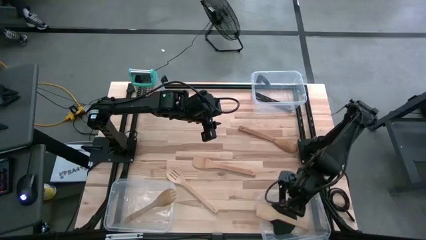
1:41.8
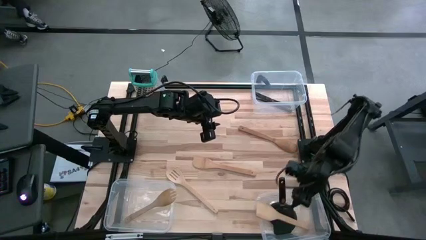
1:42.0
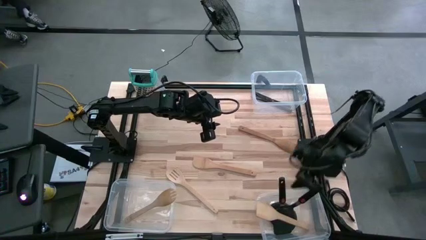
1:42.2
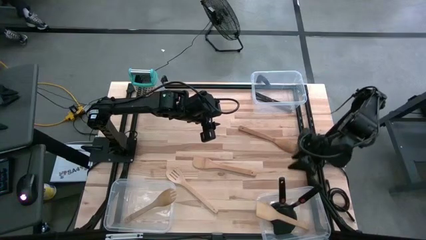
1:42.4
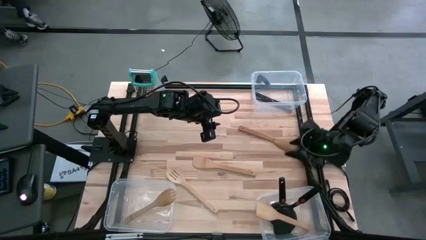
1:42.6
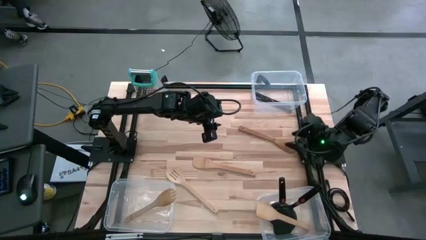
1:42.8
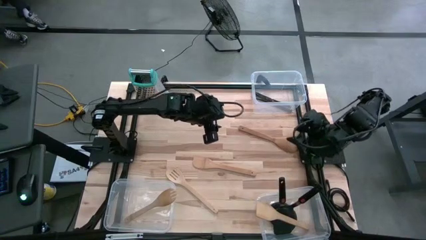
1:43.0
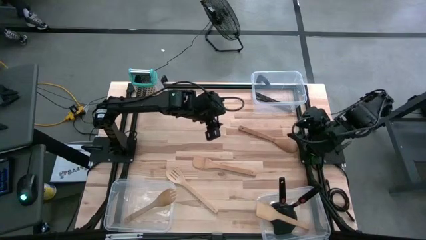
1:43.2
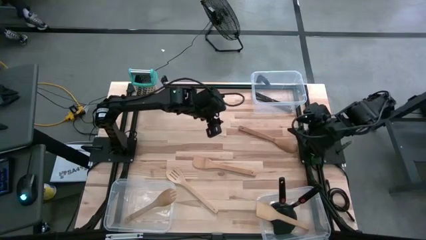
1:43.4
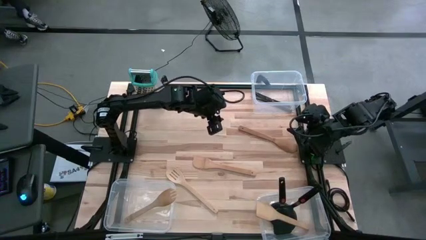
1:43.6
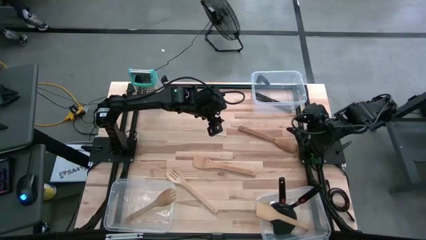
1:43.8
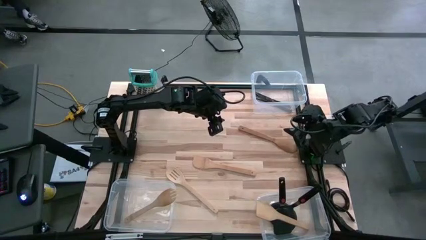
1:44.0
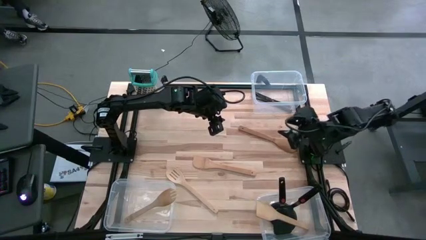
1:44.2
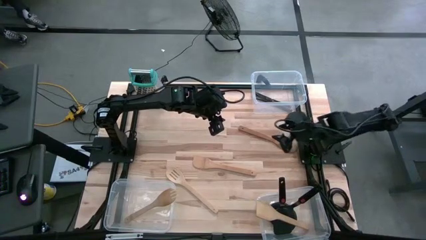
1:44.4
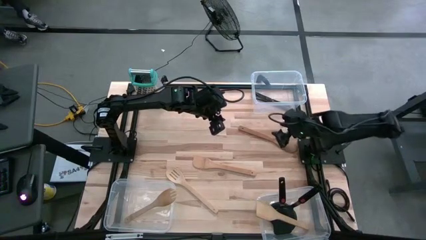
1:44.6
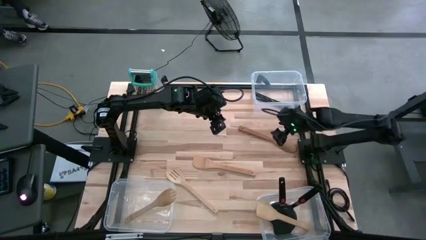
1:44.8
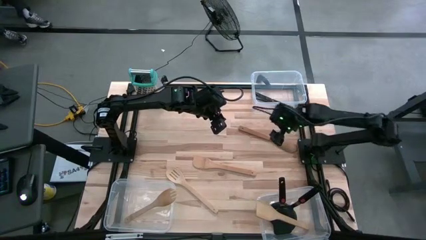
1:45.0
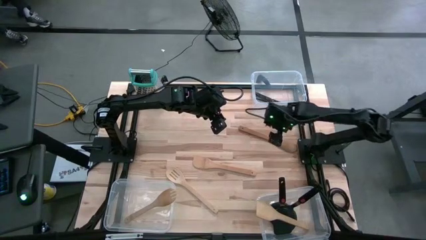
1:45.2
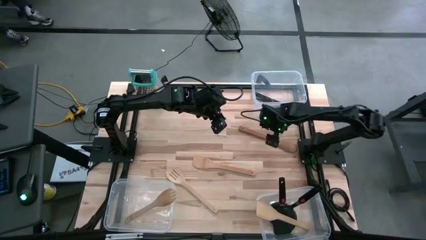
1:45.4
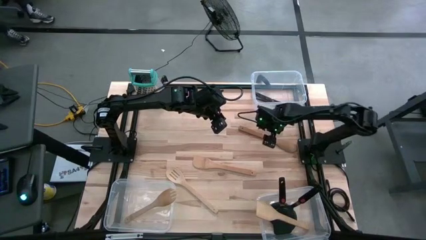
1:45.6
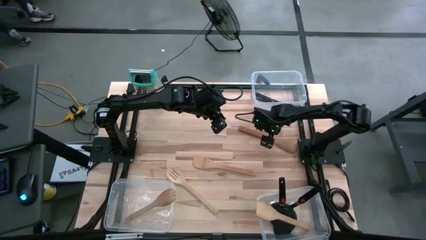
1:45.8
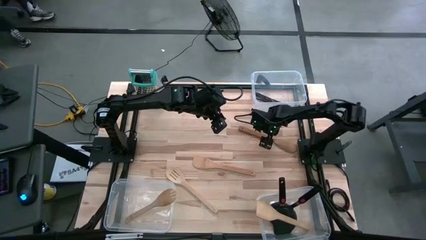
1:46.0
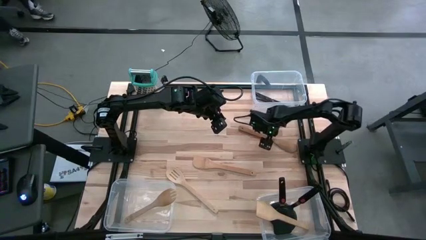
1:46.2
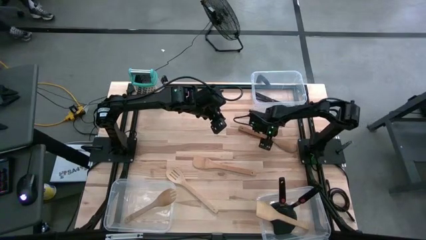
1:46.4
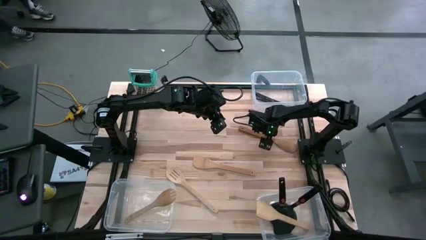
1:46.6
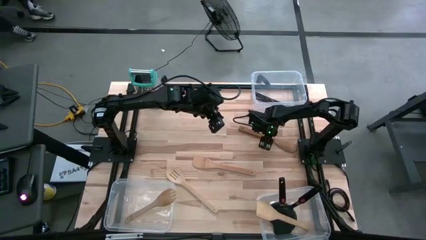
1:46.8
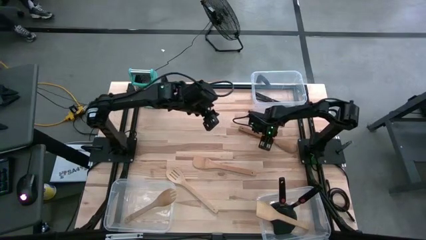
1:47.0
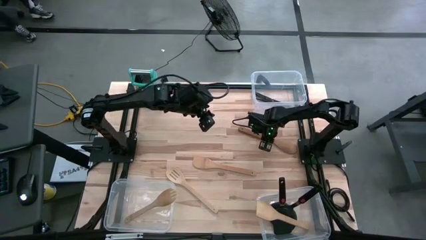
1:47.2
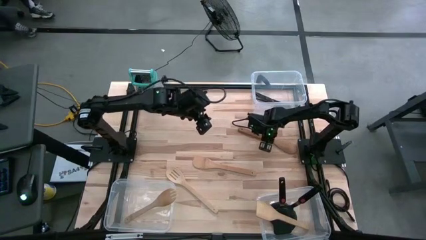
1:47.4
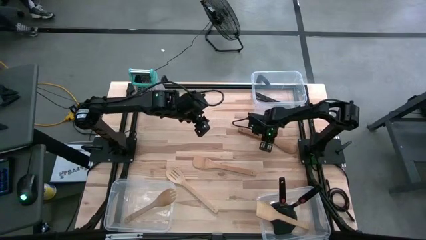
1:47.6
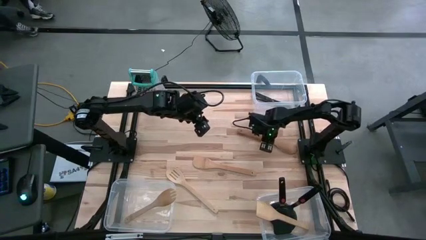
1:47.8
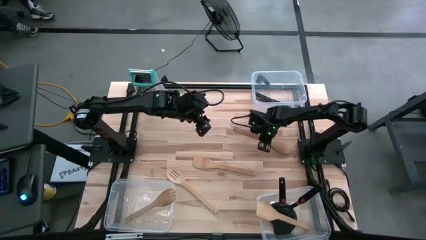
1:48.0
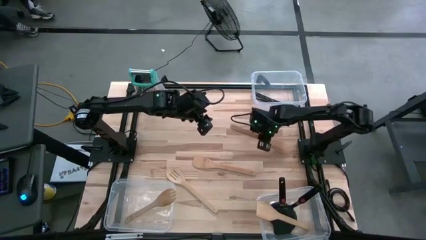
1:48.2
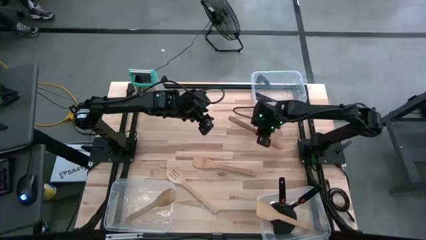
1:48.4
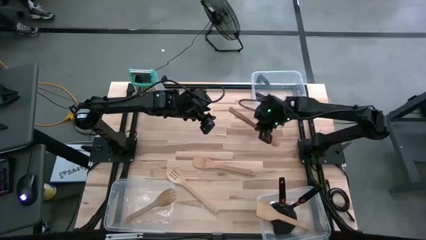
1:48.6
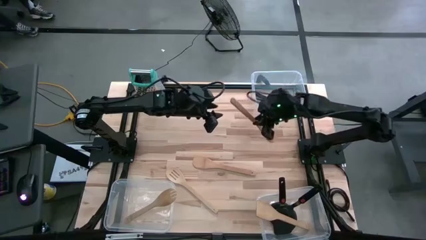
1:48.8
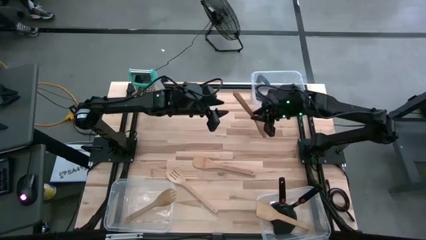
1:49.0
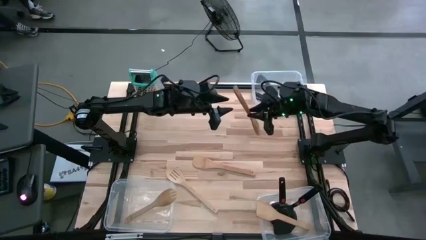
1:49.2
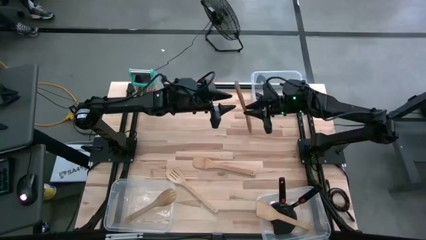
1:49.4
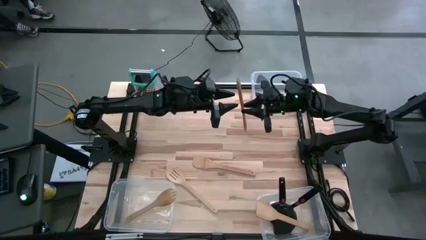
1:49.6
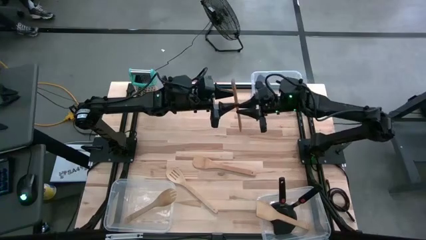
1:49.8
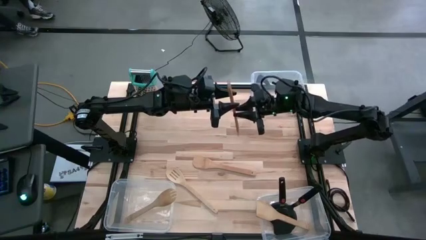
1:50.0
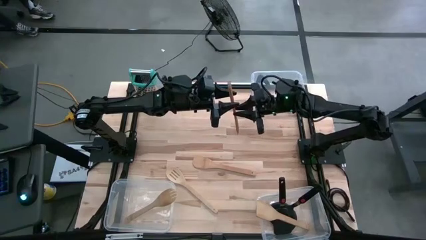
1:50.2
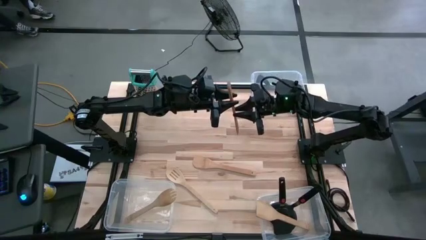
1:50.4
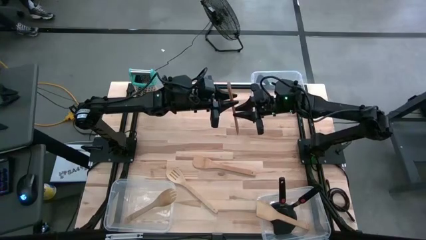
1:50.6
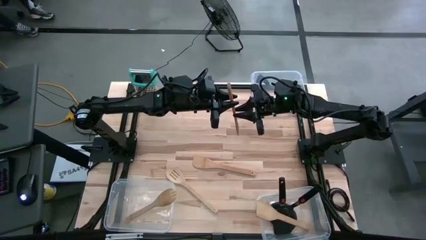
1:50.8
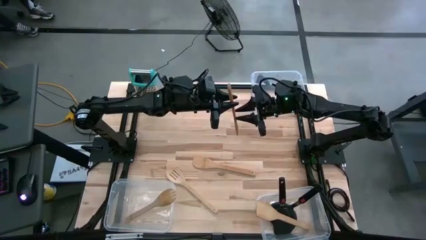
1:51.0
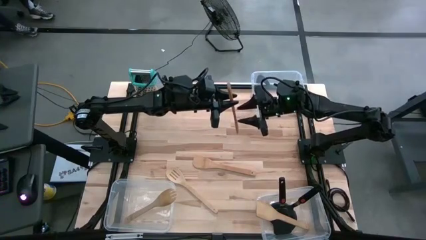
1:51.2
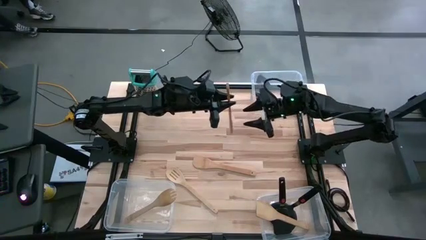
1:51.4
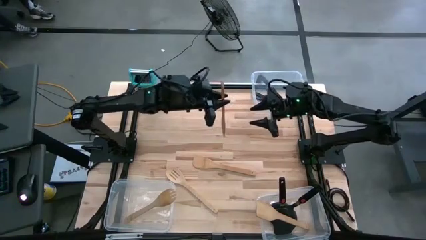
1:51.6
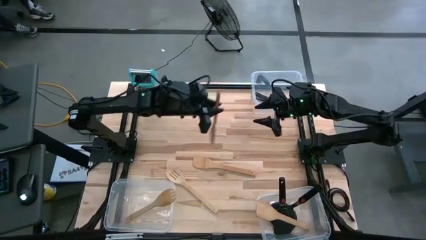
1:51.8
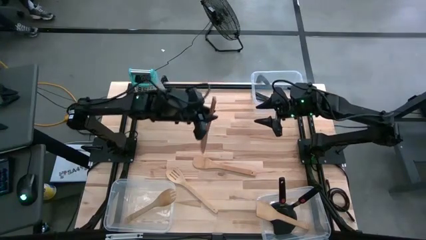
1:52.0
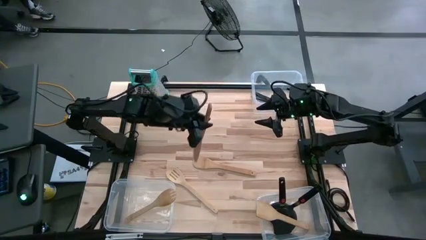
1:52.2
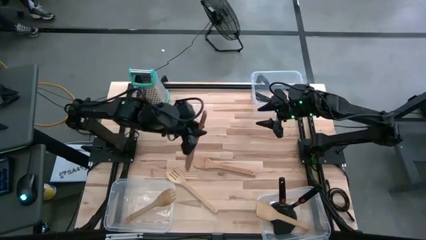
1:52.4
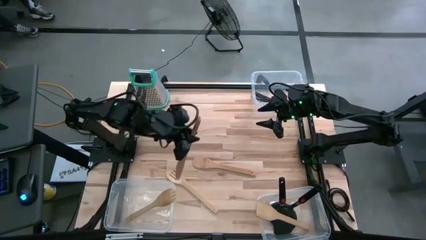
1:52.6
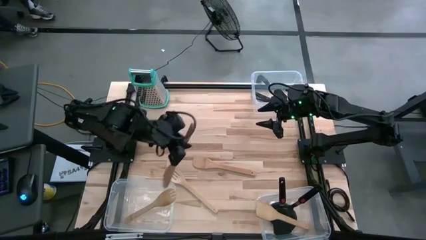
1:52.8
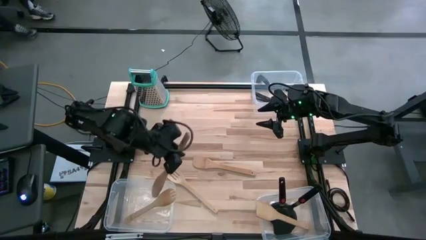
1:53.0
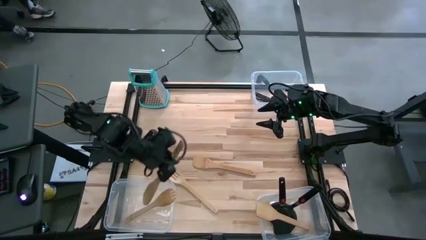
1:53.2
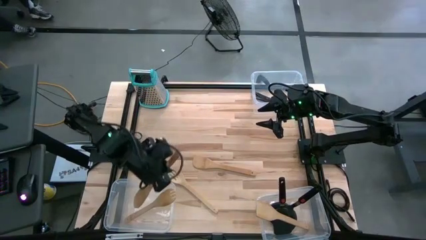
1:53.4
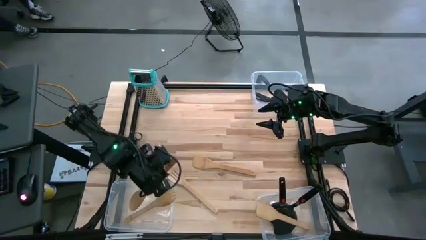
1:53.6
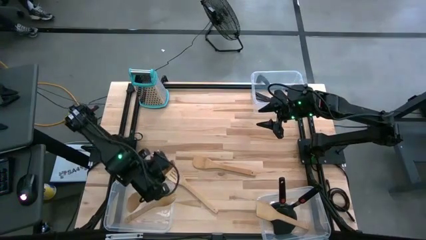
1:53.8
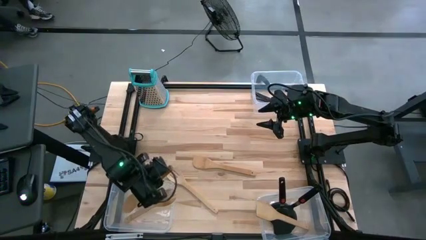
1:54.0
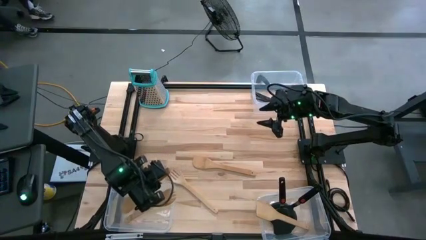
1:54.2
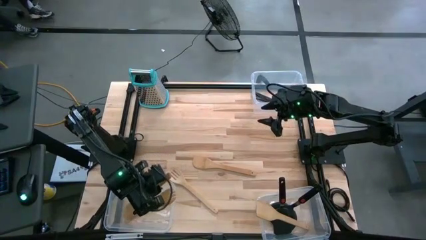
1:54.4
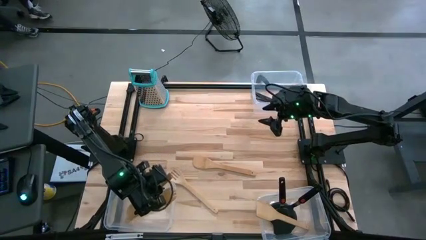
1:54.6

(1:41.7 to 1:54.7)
Task: Pick & Place Kitchen Items
Put the light brown serving spoon into the bottom left transparent bin
